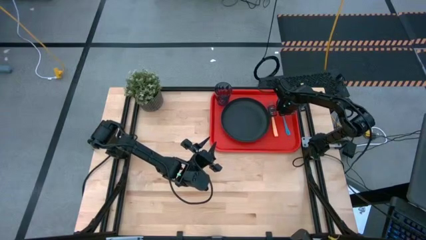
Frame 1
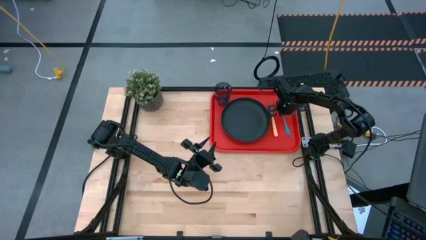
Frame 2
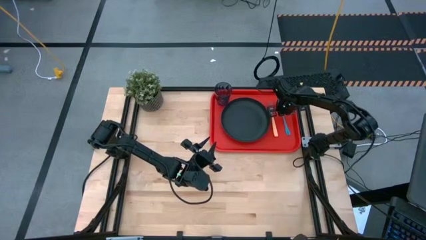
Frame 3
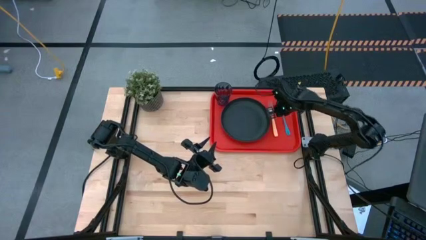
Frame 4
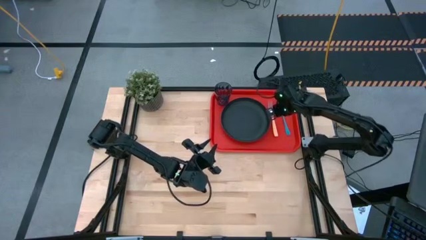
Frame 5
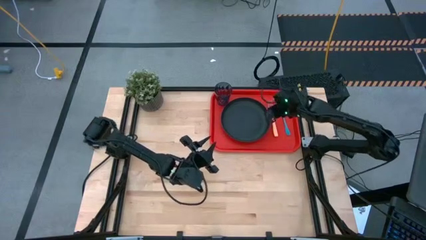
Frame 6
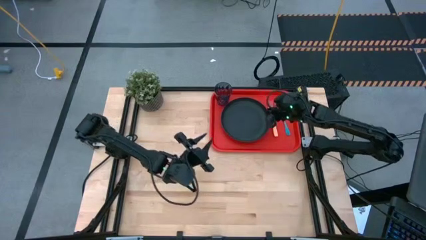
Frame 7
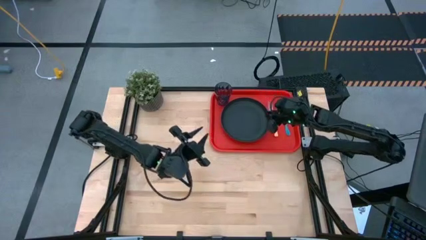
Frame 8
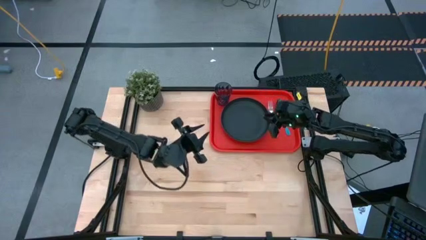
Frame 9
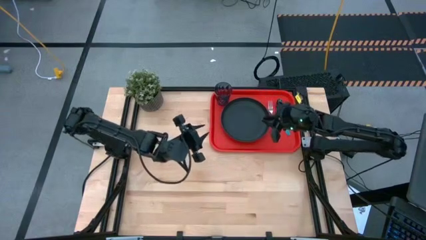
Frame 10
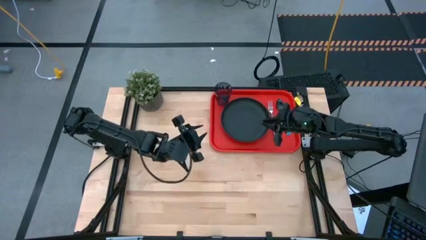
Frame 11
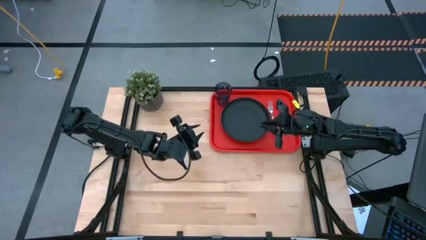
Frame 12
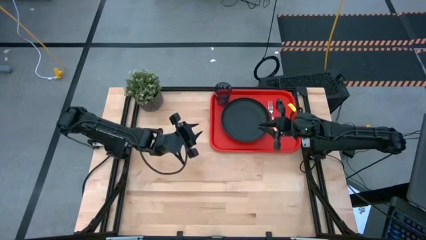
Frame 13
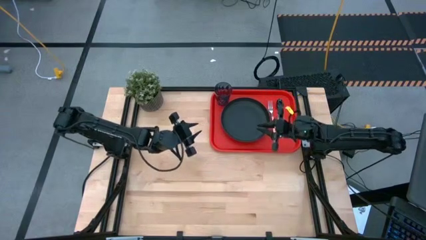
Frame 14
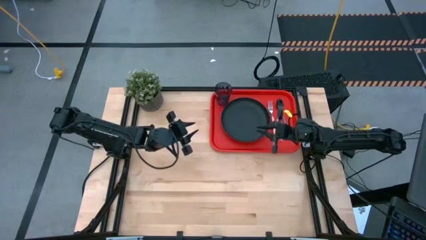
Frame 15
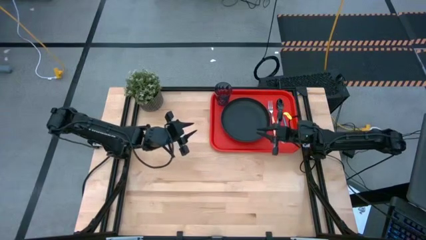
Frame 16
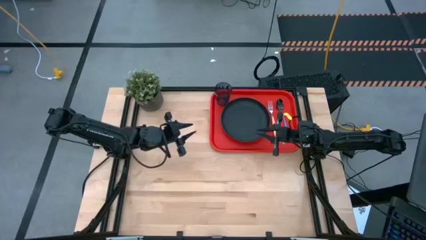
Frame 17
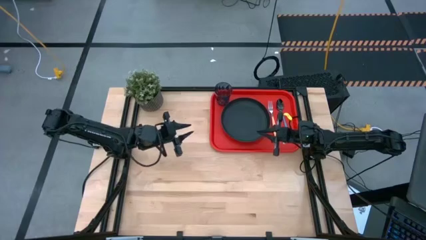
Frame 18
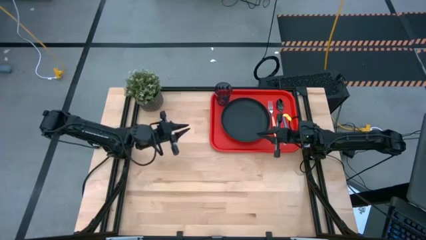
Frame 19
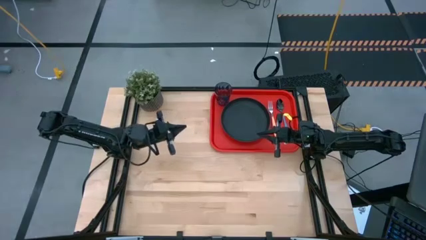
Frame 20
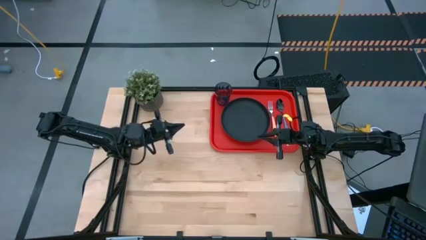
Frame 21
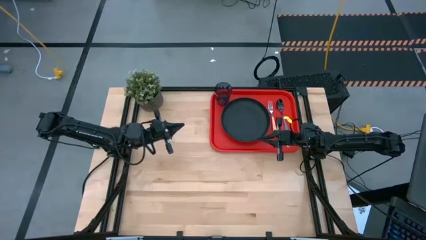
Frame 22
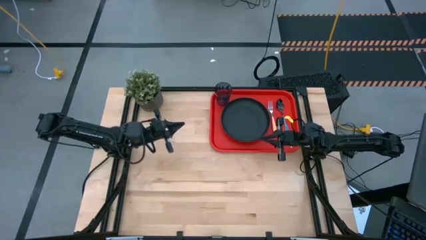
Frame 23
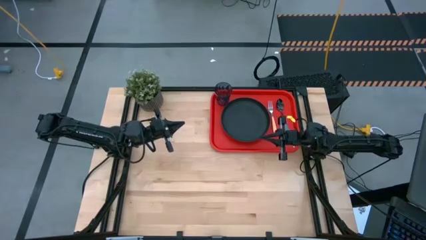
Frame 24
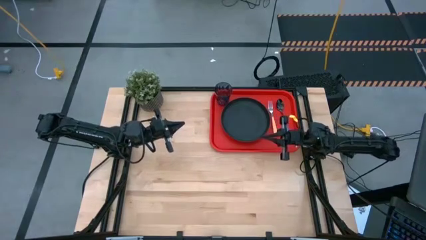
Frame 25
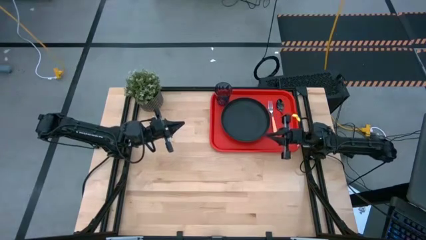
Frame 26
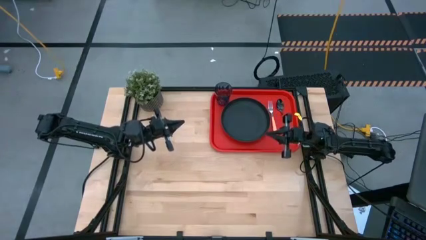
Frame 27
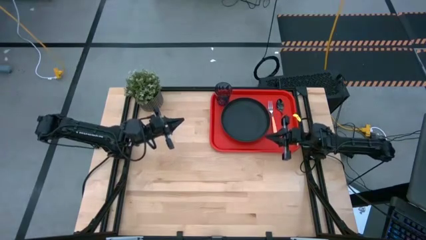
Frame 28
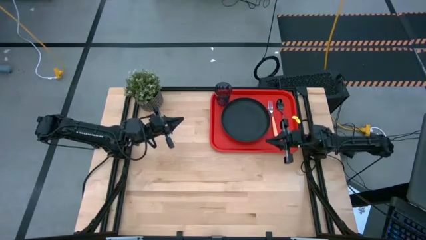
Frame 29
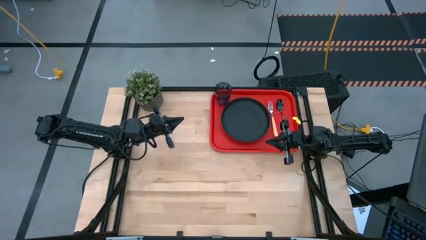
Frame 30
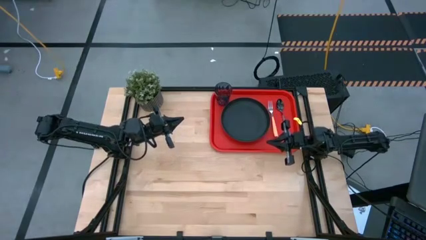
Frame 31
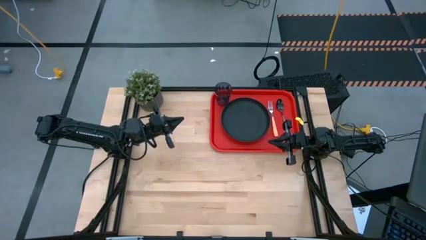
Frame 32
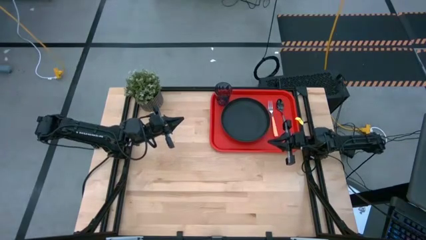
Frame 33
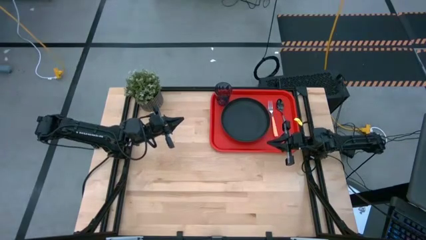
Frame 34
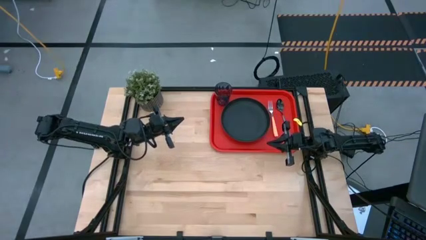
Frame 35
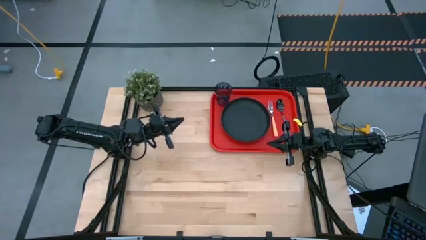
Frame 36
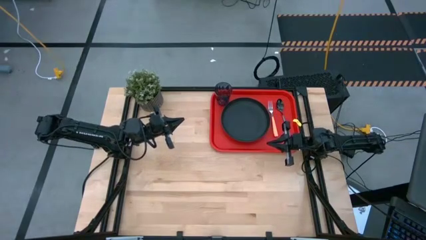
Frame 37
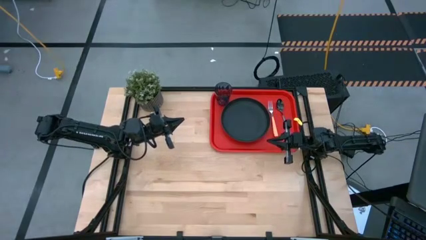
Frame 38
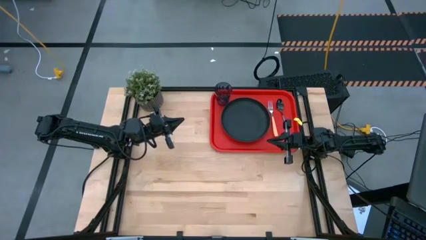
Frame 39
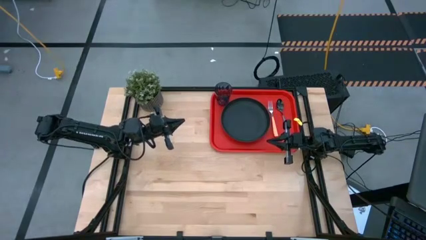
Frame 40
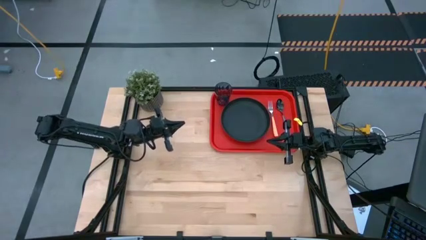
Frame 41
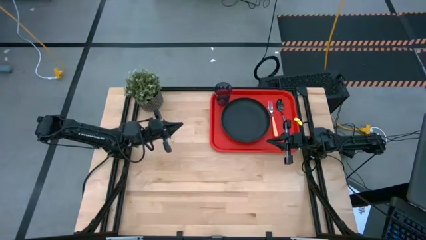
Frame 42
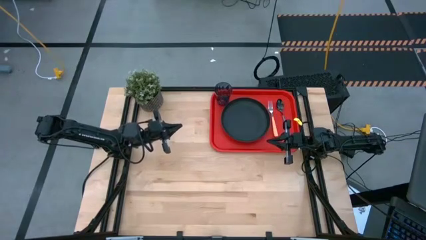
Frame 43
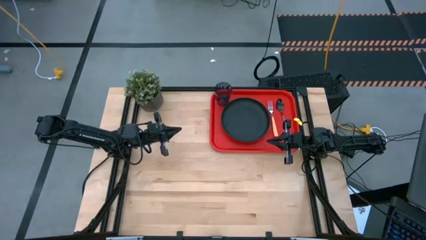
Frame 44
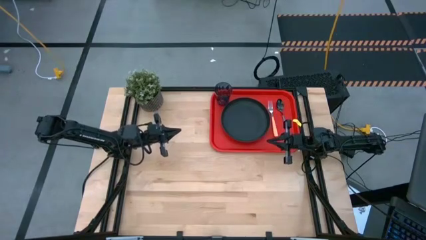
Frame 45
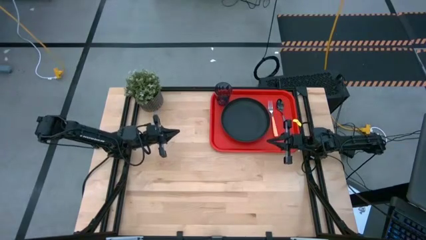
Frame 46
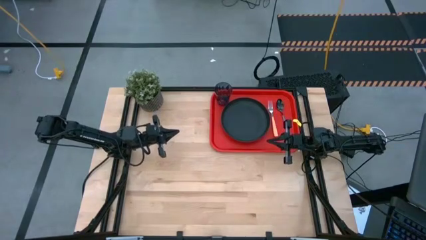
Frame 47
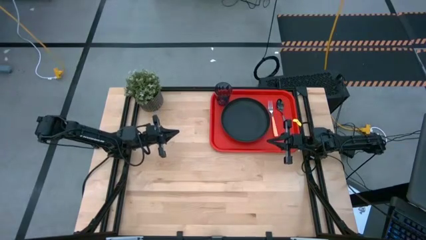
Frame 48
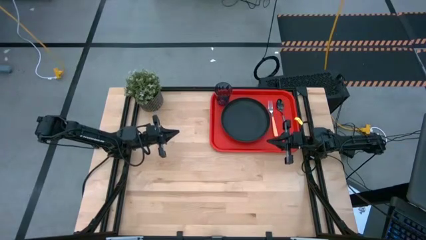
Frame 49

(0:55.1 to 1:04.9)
Task: Pick and place plate/cup/fork/spoon on tray
Return to Home Position

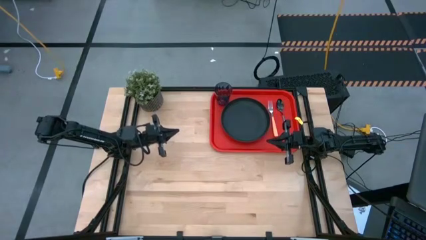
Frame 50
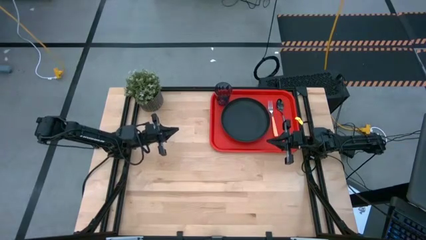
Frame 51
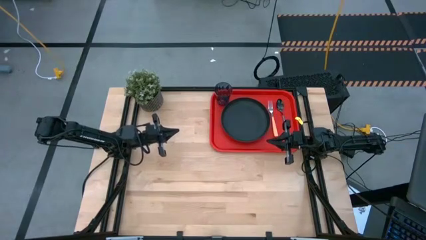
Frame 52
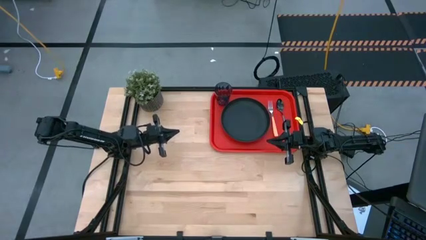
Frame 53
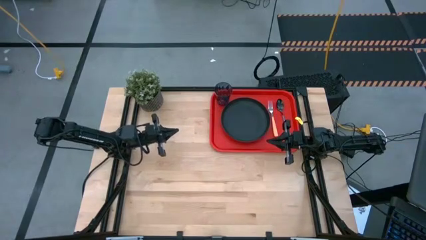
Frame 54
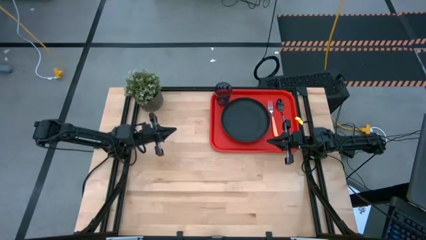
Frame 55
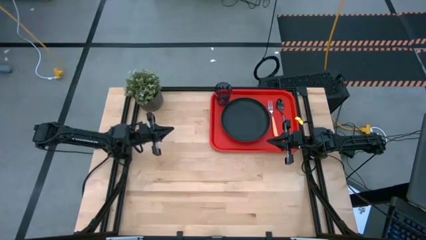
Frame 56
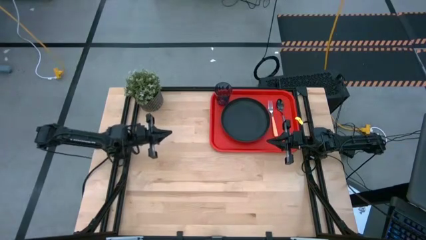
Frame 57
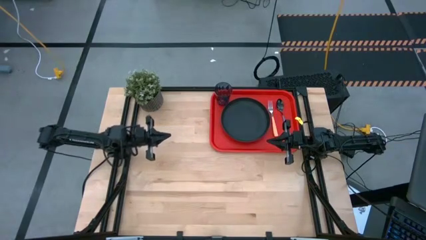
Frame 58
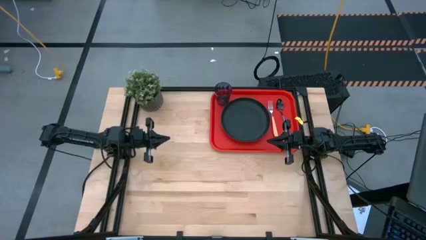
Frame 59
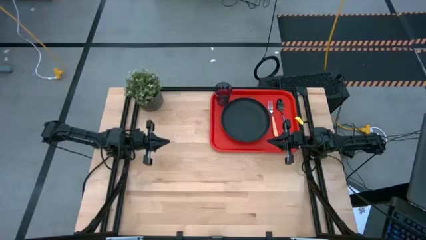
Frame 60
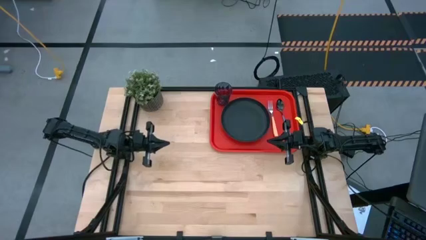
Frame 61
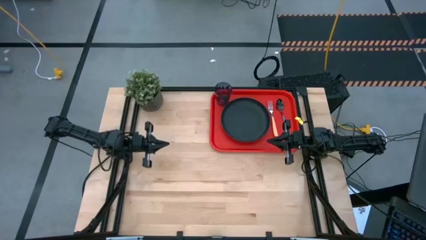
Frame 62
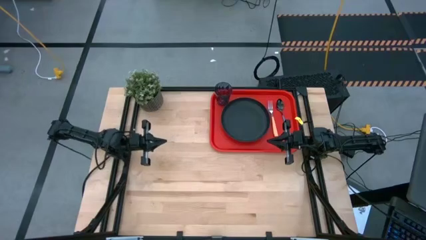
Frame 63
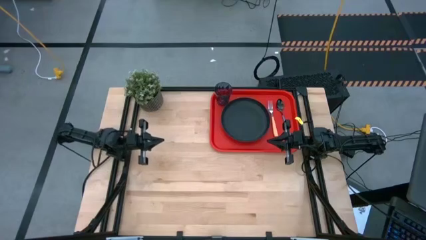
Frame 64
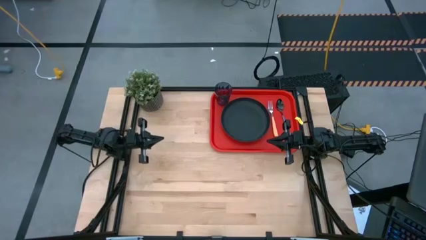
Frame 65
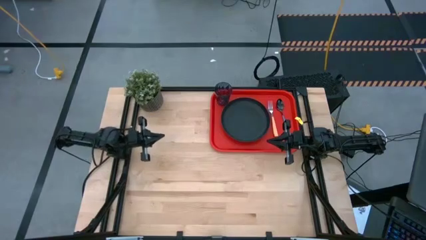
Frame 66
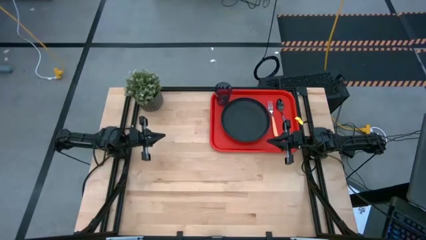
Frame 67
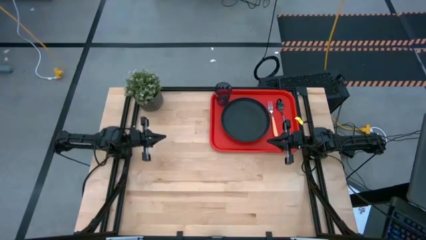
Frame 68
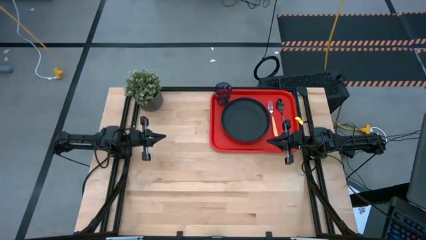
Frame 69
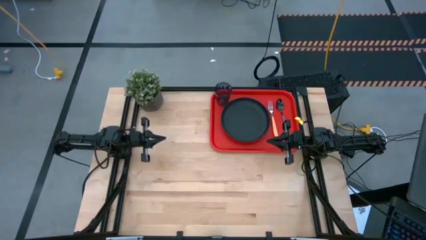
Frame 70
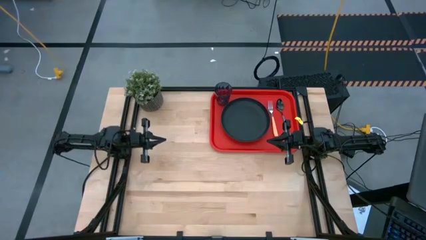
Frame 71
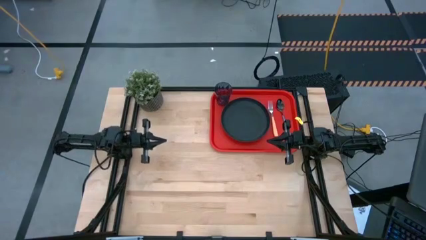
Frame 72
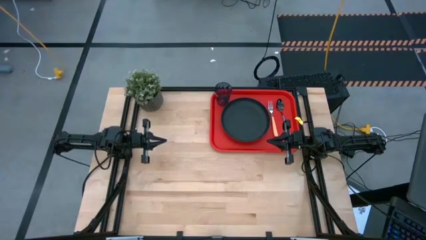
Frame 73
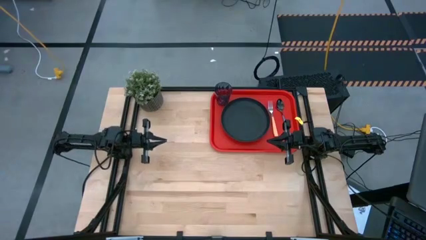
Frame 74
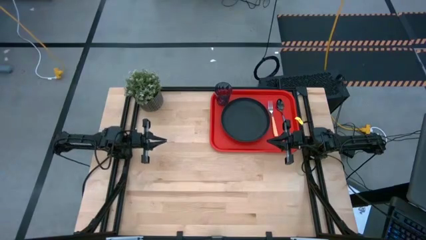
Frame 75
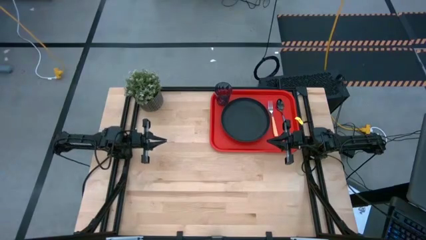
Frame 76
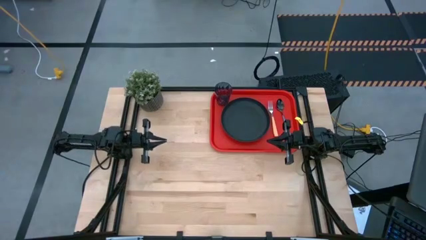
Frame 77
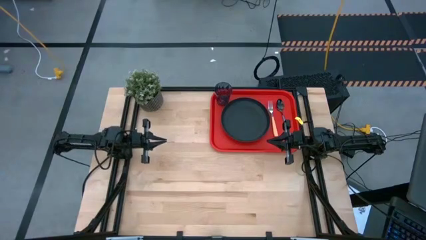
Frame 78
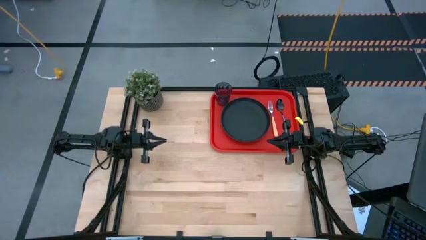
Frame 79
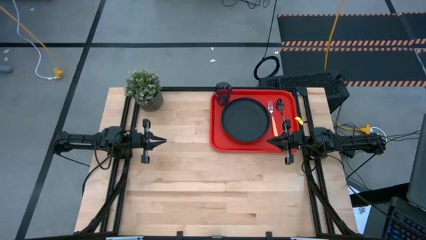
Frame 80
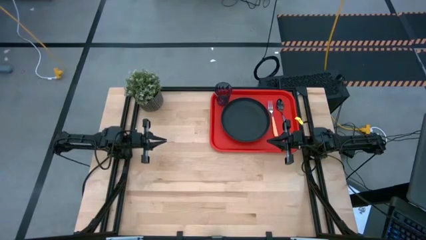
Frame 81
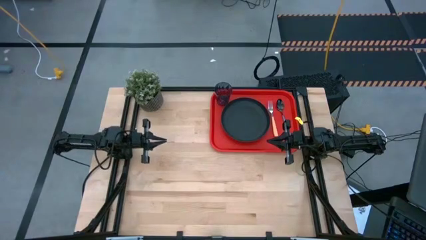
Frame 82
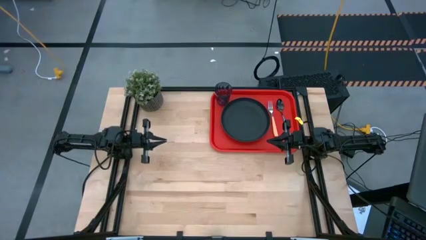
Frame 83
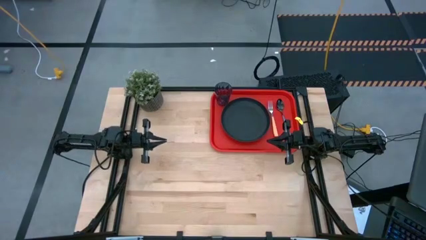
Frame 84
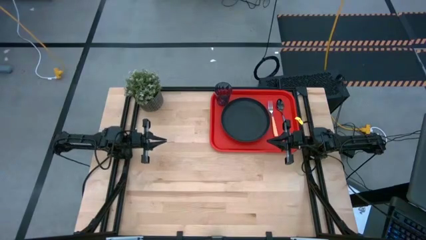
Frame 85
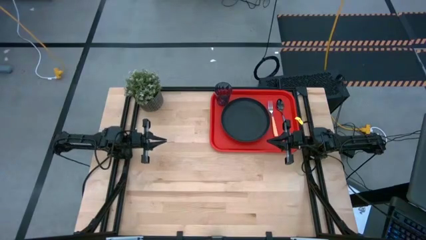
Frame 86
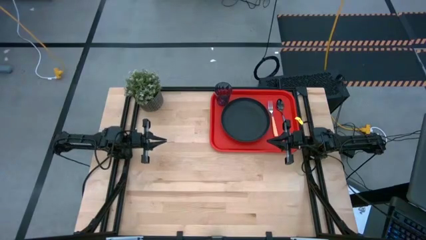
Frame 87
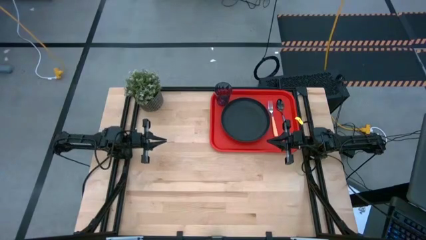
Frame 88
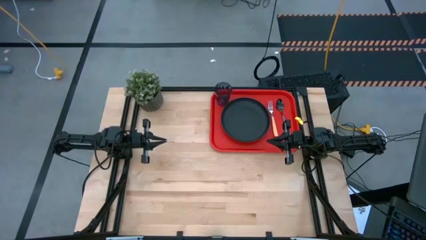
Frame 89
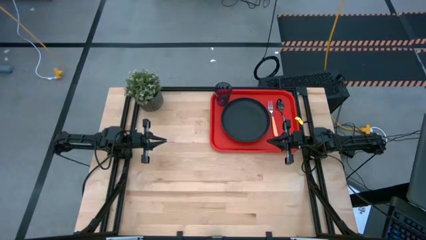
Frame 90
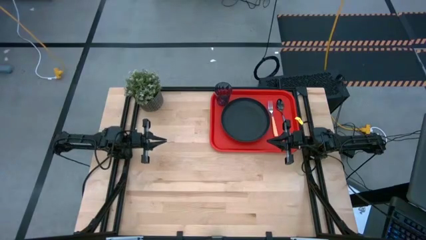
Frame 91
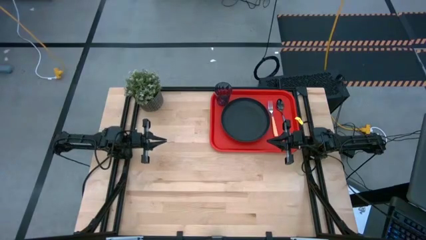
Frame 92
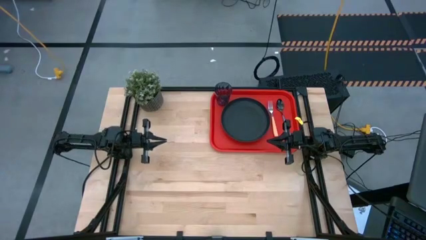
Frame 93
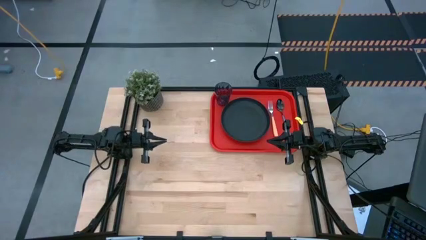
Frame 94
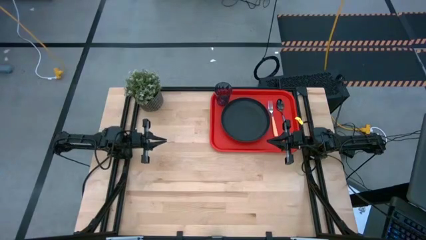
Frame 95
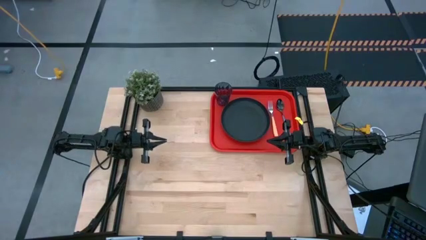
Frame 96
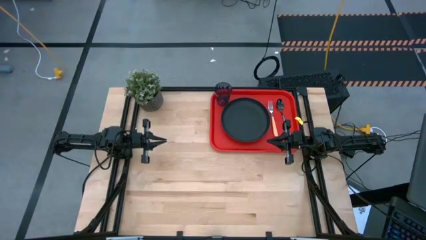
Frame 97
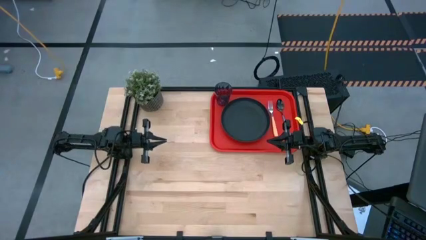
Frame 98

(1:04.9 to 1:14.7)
Return to Home Position
